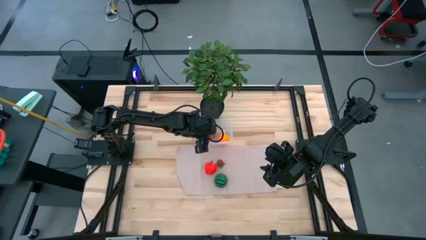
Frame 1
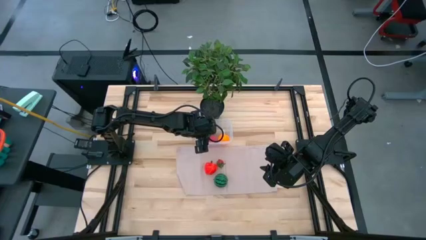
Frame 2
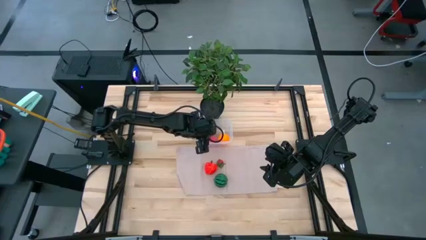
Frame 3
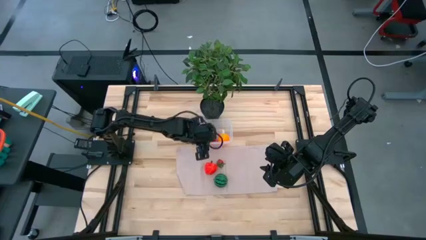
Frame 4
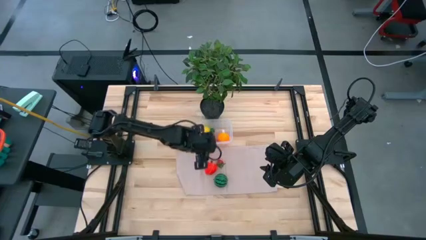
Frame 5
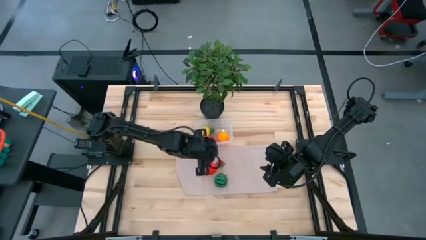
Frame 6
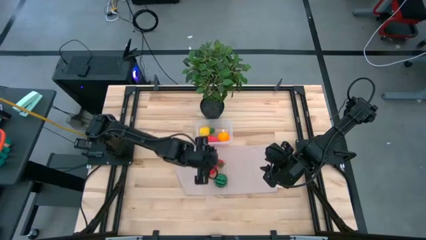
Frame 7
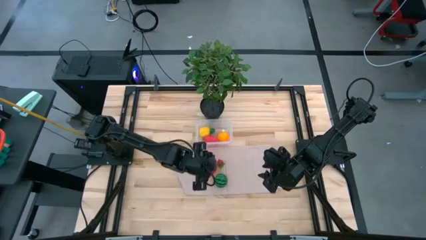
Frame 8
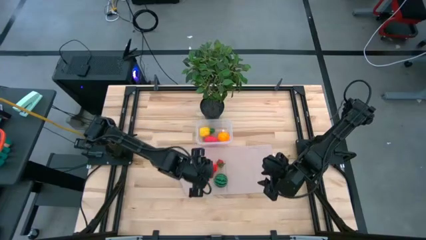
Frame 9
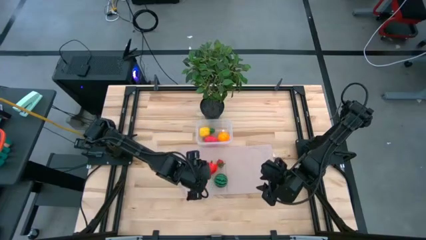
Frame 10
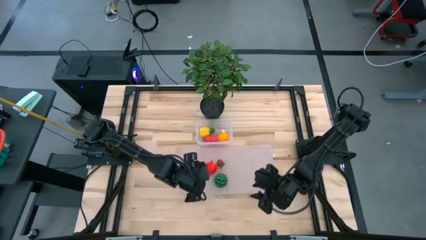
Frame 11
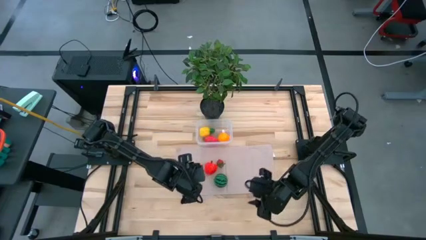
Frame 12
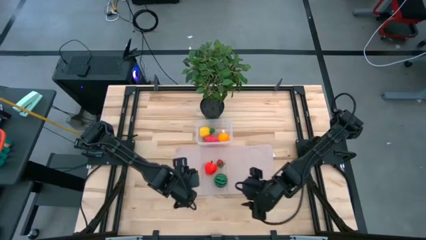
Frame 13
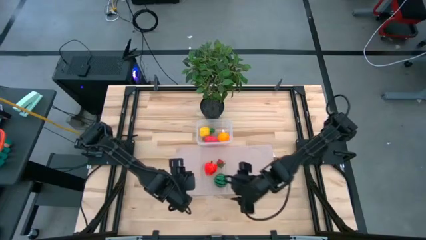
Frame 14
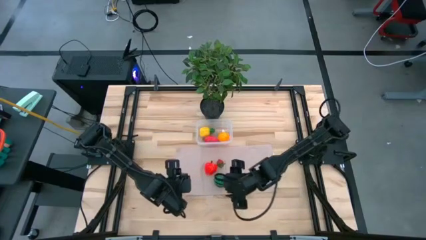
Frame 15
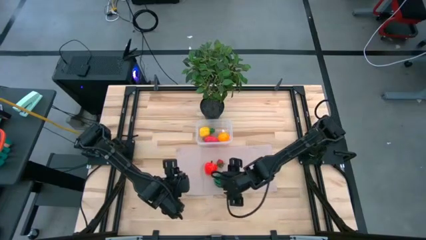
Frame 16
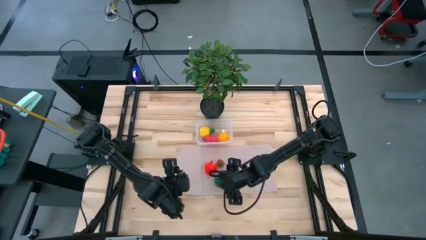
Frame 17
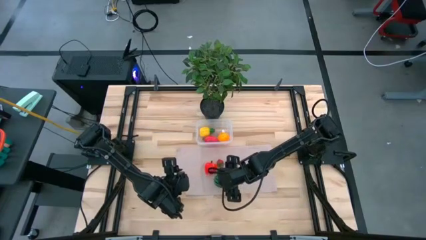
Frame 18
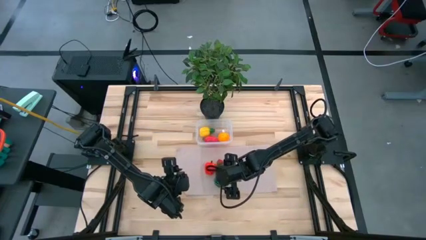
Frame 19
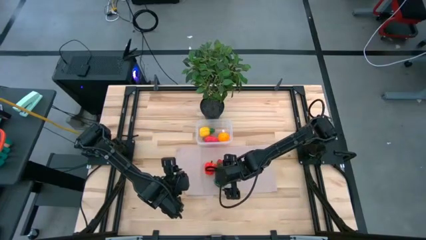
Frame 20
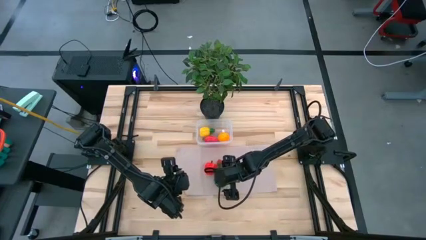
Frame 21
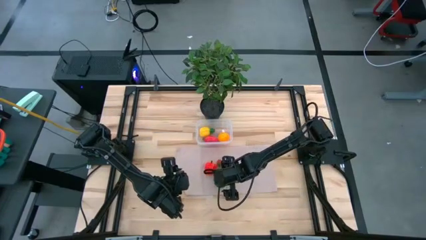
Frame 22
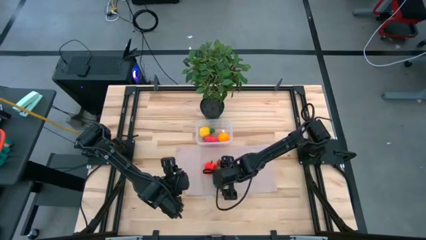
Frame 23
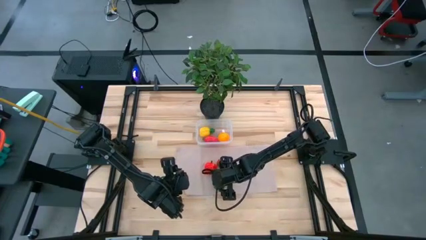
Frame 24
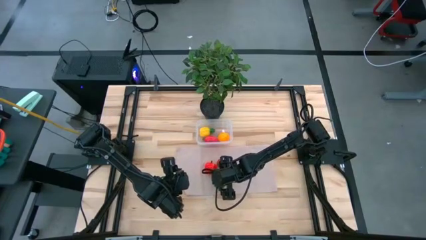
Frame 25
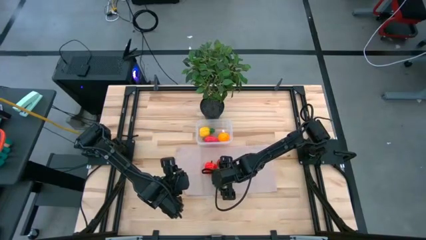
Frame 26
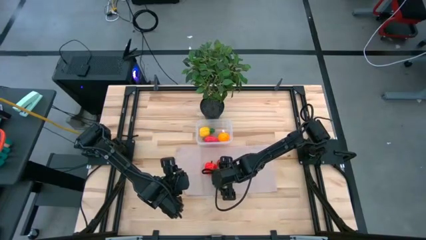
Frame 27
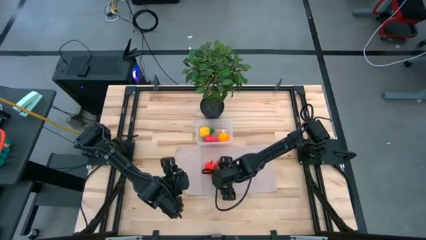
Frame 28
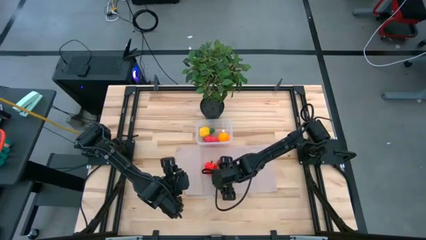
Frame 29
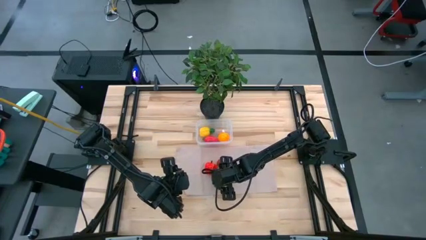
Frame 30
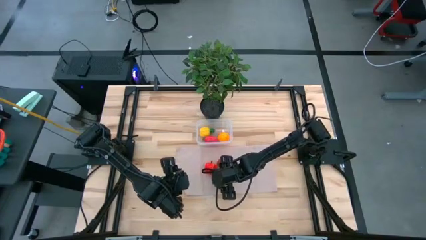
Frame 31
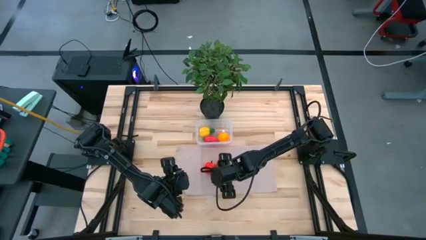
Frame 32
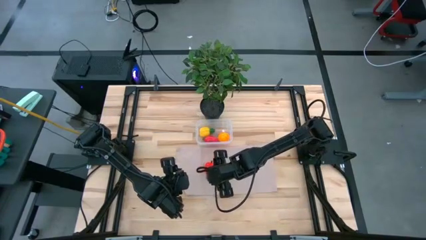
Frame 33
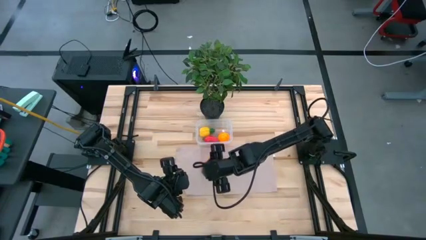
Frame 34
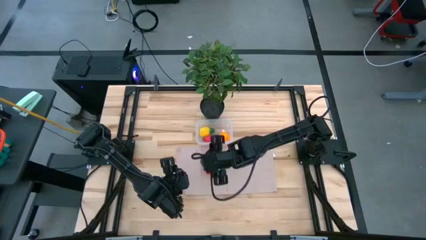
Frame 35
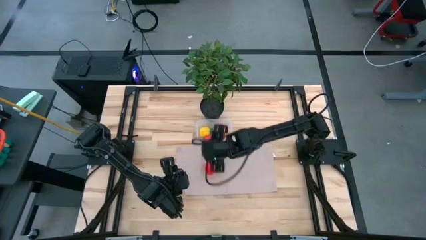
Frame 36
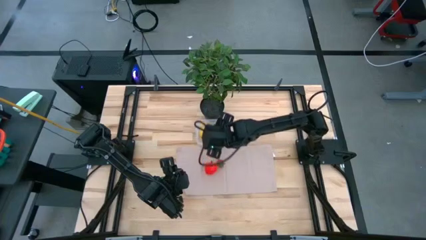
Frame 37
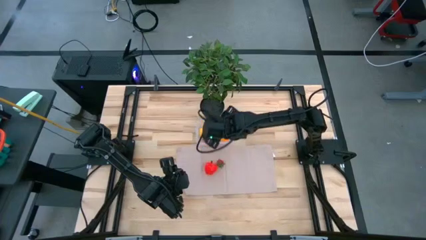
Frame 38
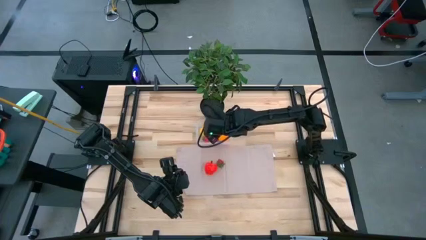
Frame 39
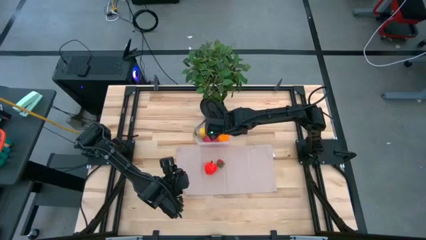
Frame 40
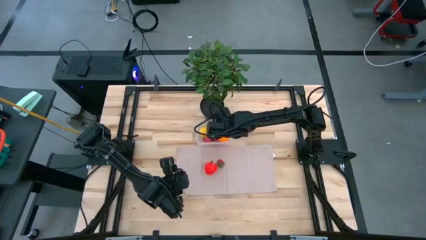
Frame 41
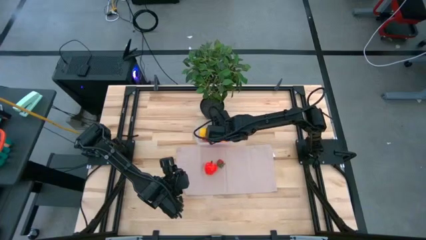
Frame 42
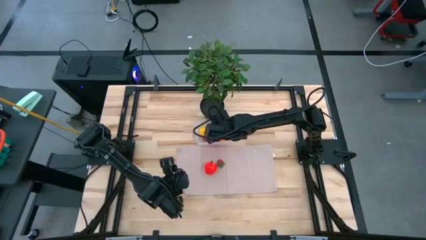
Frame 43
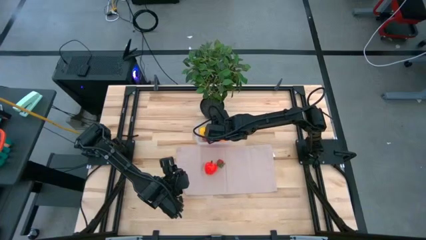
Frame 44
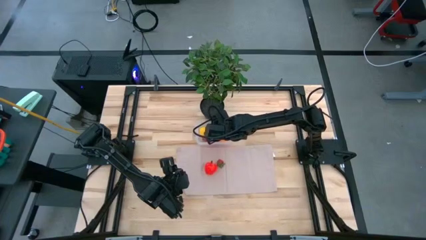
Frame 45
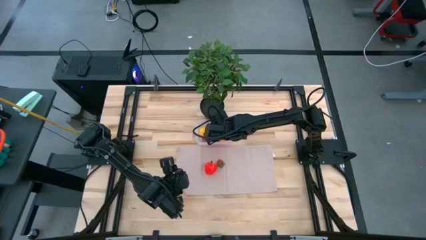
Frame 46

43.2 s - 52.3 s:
Task: Pick and placing Produce into tupperware
Put the watermelon into the transparent bin

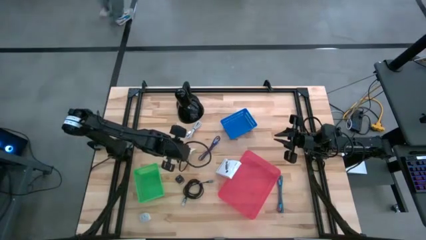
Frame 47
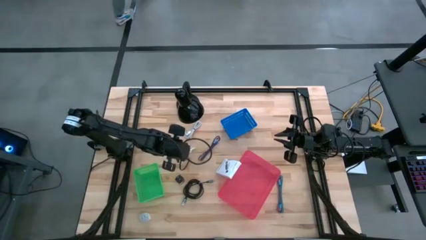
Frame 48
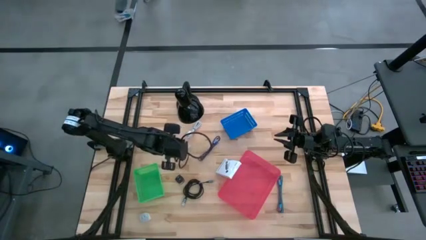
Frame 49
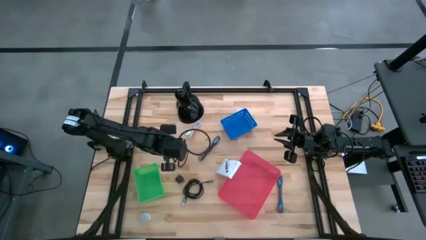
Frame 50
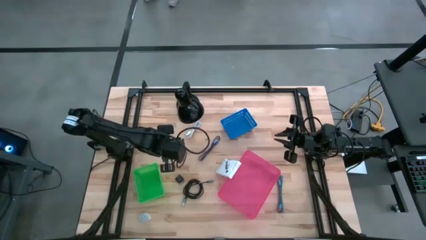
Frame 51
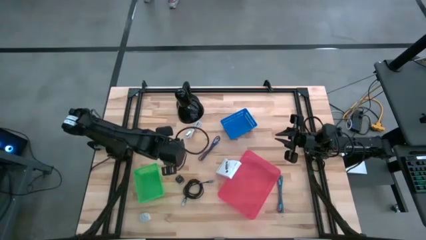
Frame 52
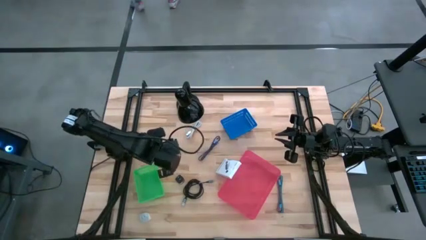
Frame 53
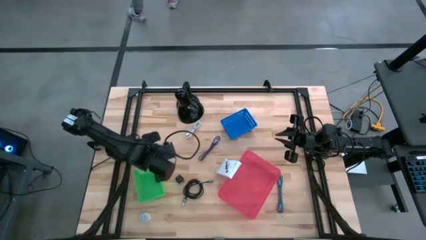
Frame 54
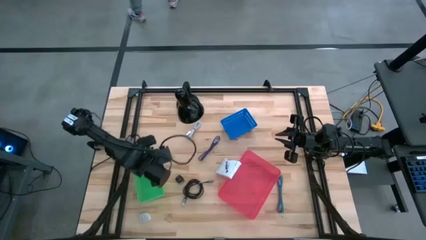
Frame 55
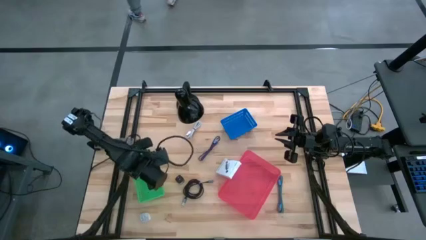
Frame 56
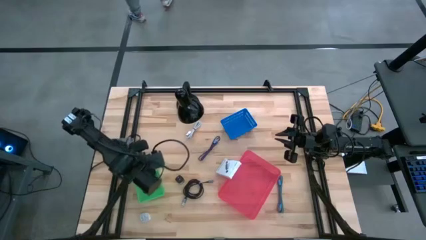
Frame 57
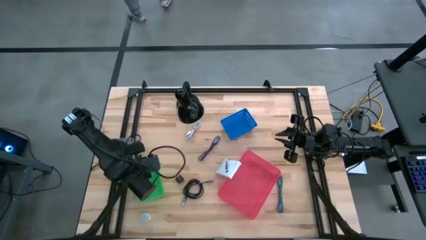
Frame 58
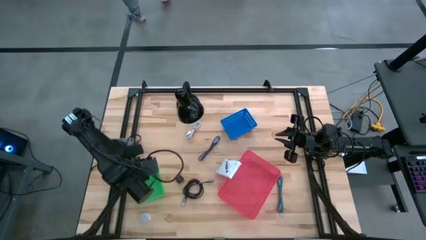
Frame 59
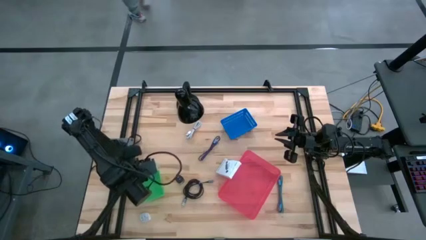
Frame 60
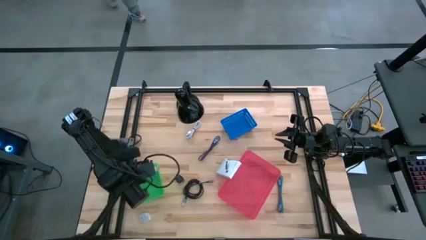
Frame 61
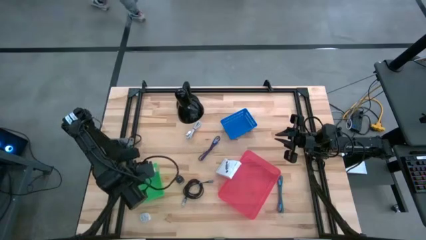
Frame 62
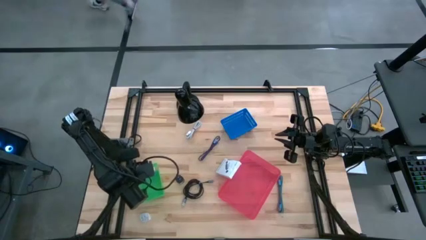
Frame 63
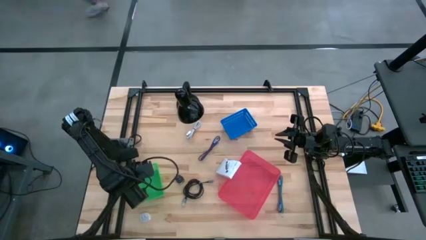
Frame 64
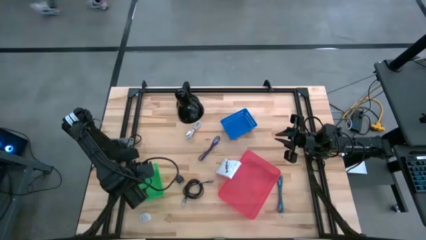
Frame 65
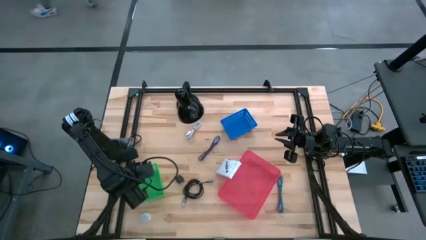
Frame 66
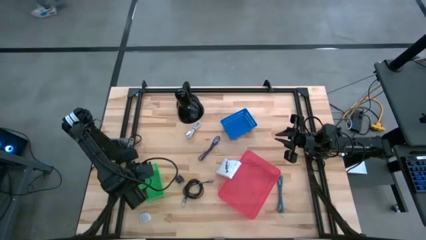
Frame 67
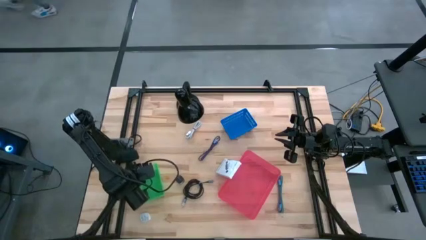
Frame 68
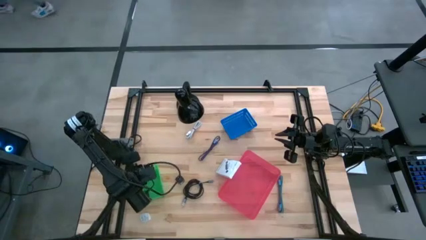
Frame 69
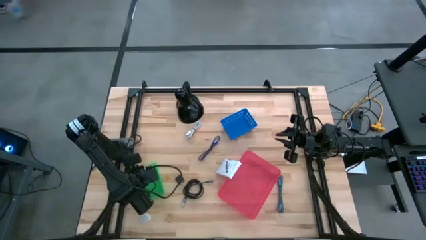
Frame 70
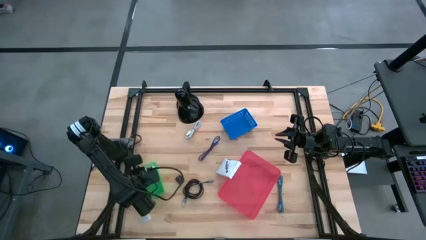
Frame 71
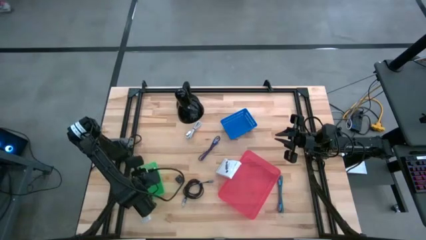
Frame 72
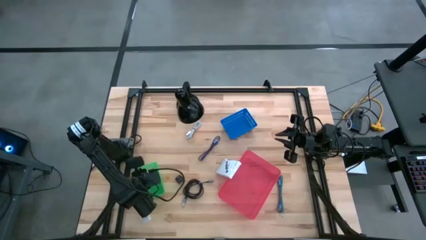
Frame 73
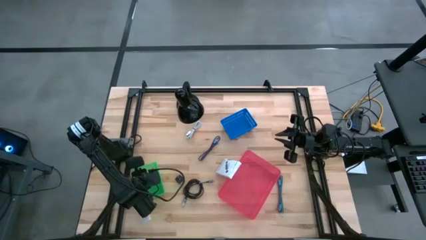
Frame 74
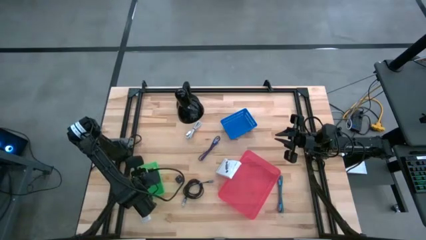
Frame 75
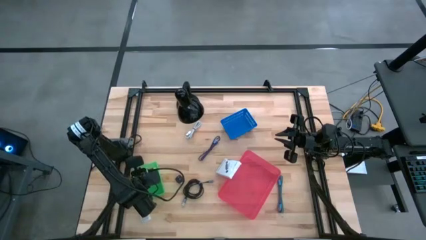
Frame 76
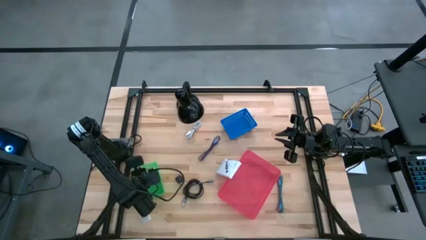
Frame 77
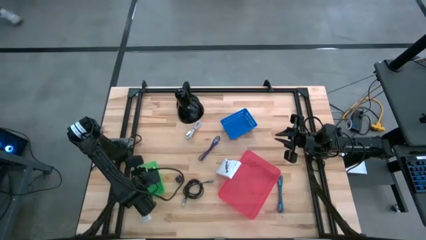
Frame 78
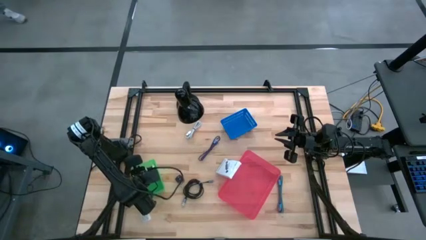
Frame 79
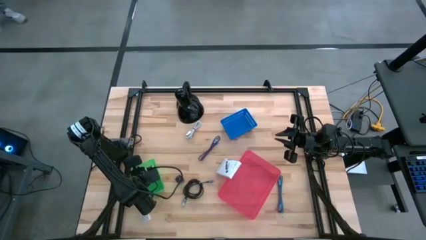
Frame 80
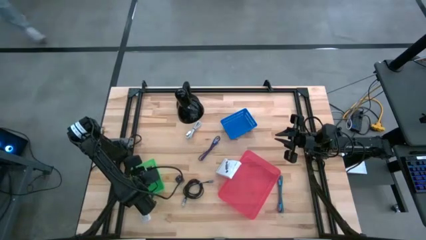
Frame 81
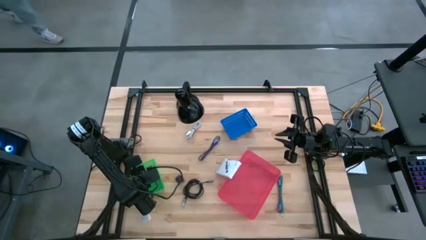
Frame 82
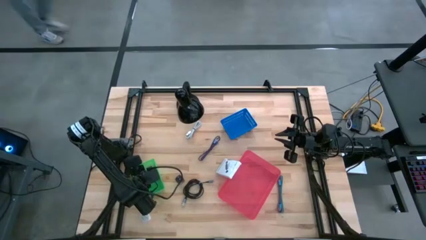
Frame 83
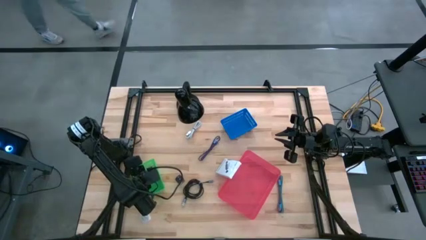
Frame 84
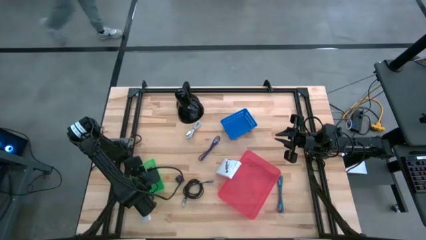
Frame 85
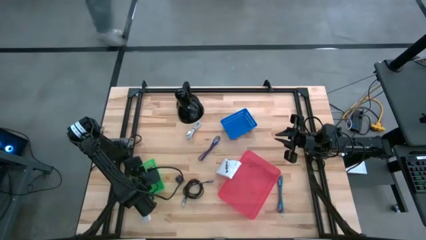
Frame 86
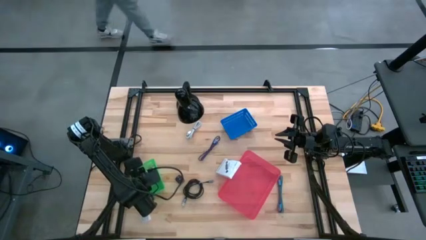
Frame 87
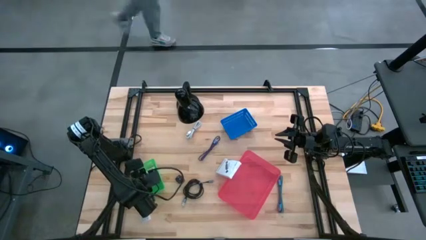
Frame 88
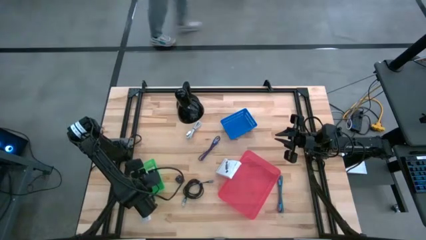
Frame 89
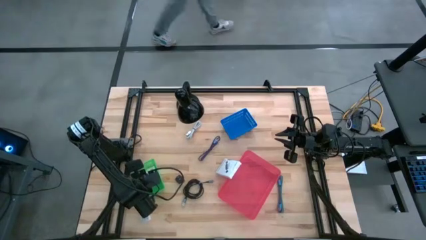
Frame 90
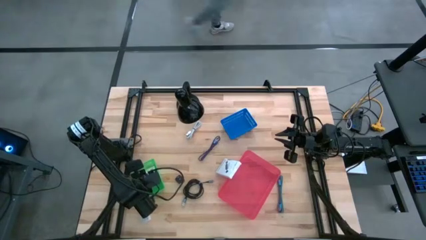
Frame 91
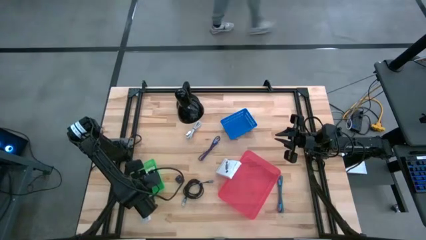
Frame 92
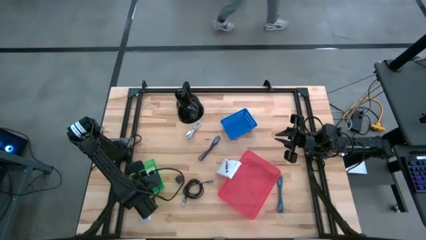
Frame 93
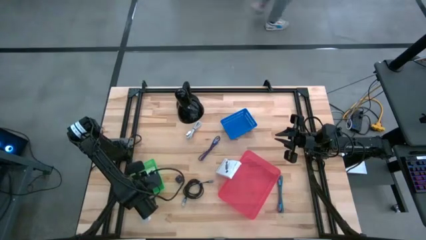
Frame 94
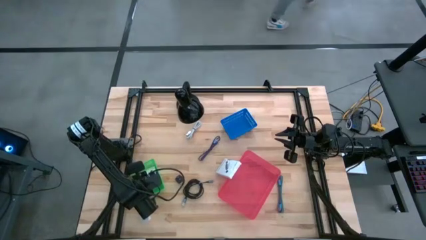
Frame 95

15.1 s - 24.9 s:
Task: Pick and place items into bin
Put the left white card reader box into the green bin
